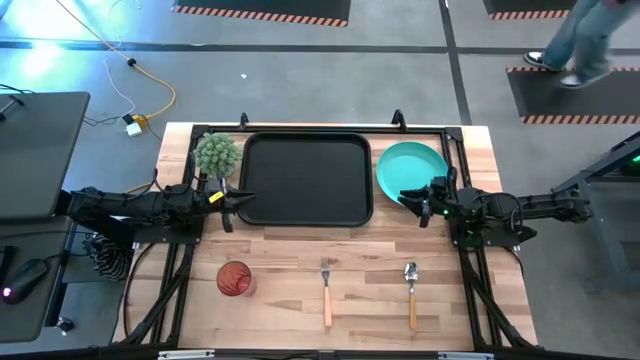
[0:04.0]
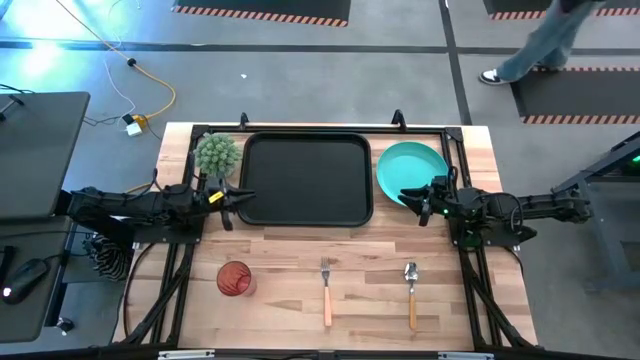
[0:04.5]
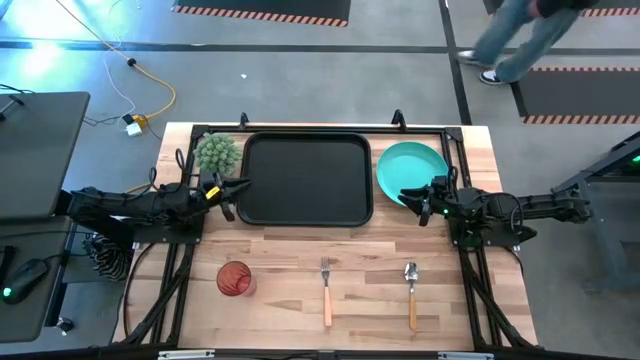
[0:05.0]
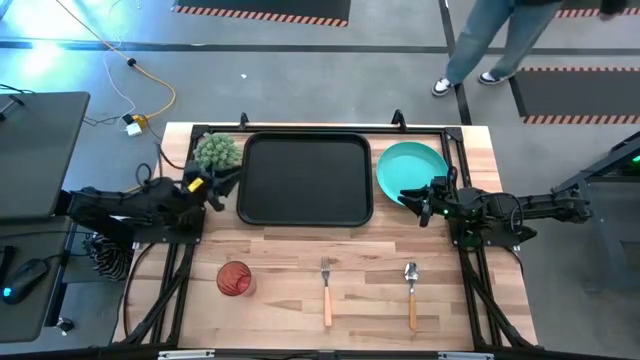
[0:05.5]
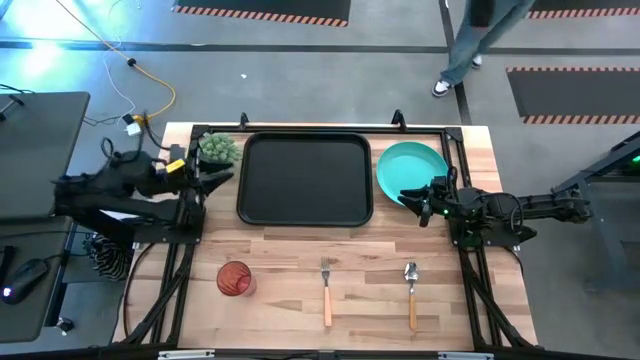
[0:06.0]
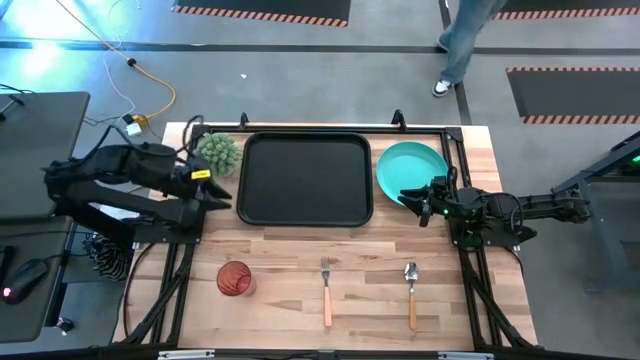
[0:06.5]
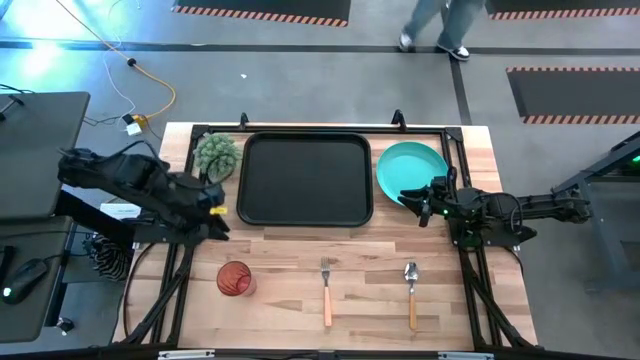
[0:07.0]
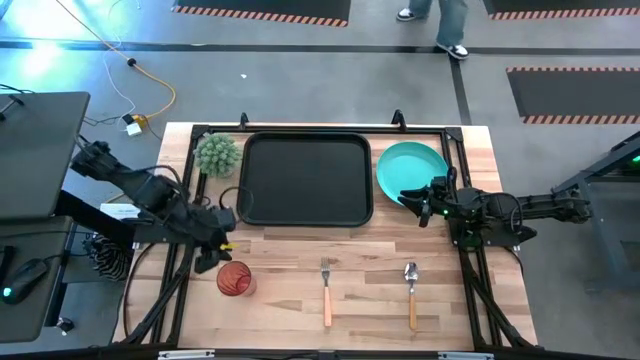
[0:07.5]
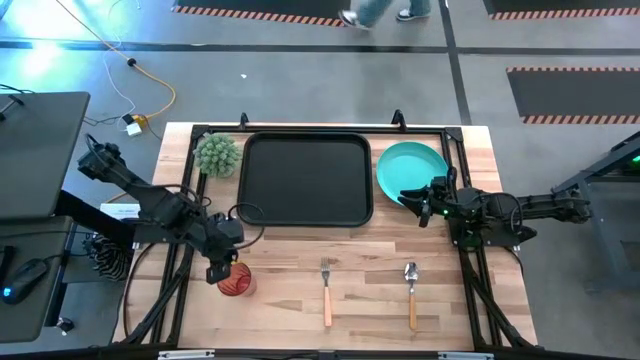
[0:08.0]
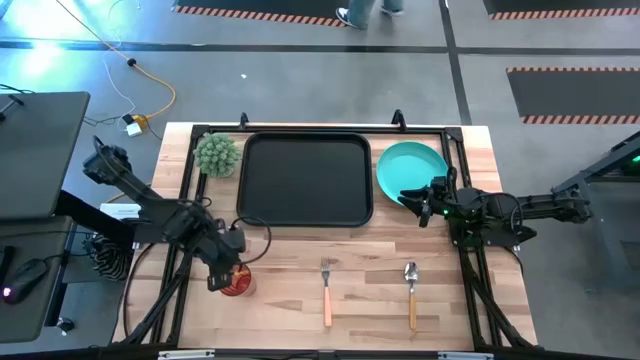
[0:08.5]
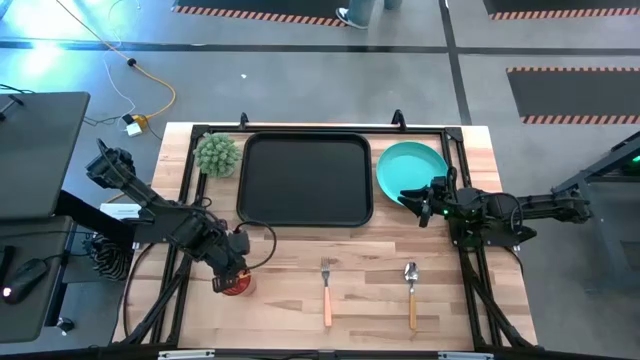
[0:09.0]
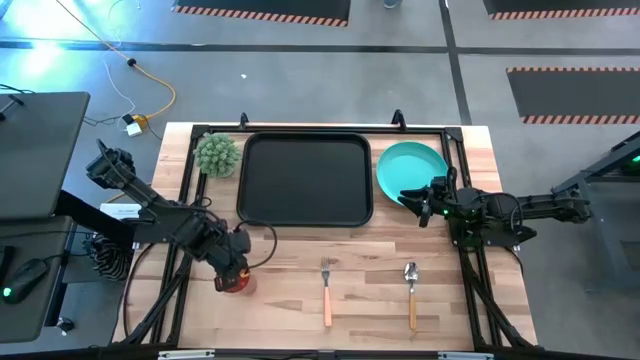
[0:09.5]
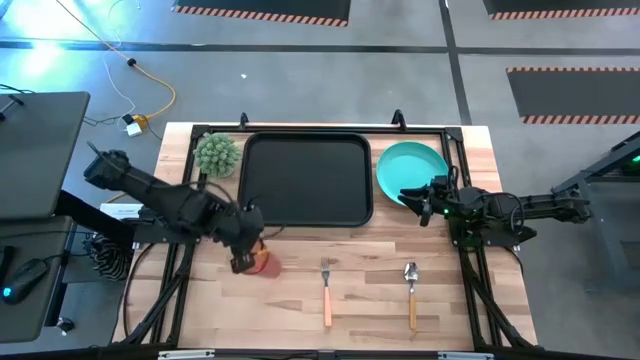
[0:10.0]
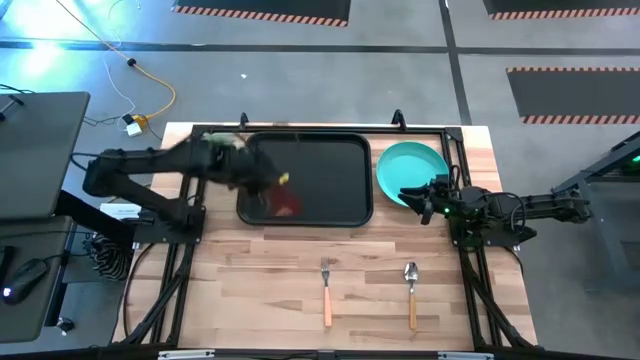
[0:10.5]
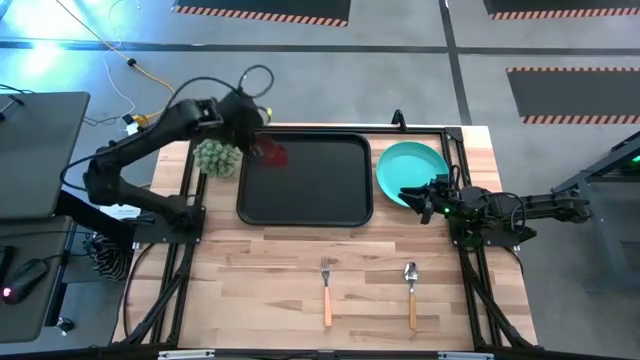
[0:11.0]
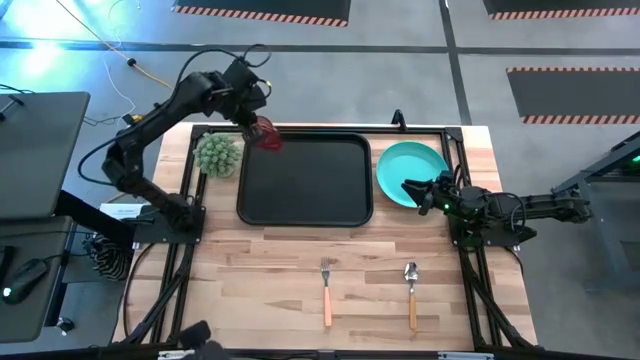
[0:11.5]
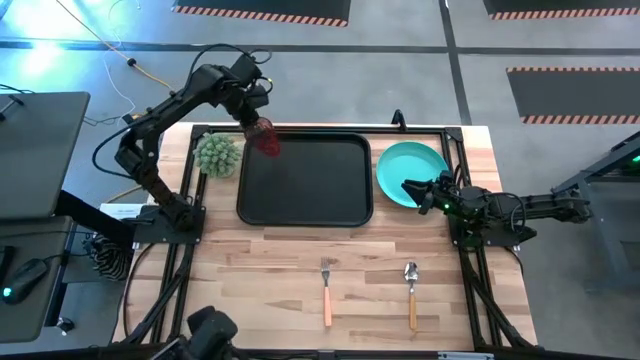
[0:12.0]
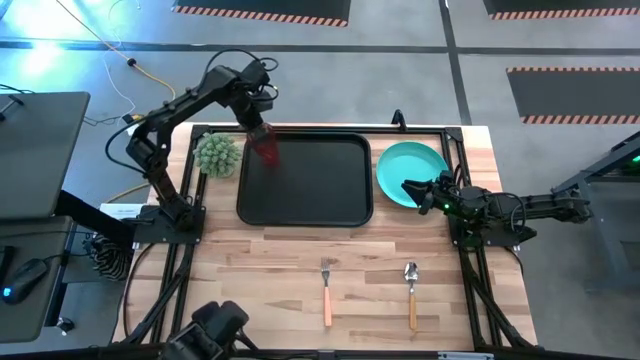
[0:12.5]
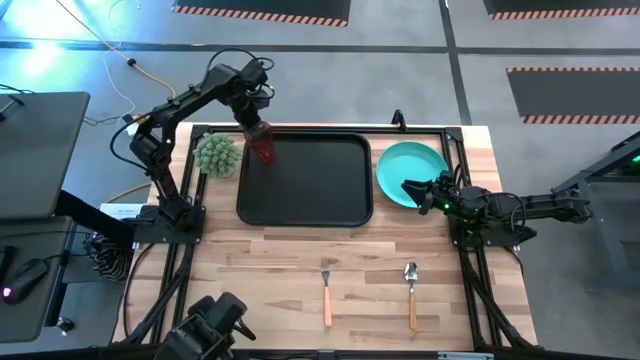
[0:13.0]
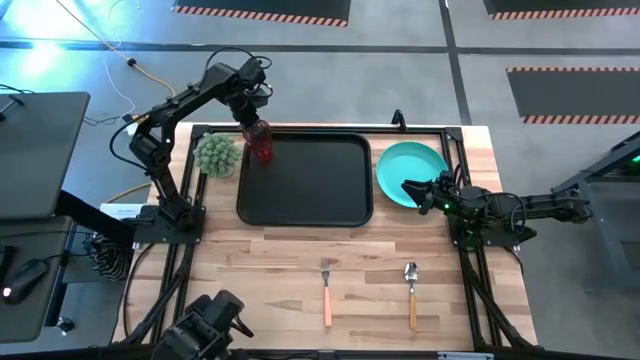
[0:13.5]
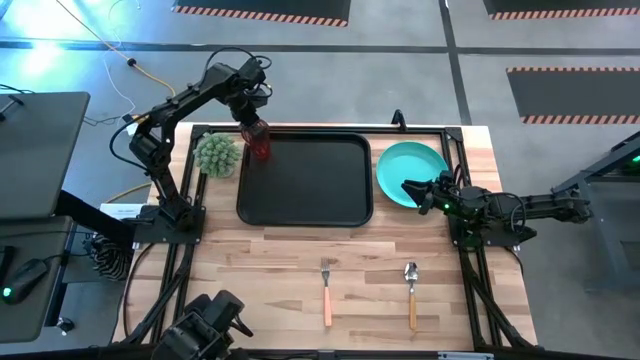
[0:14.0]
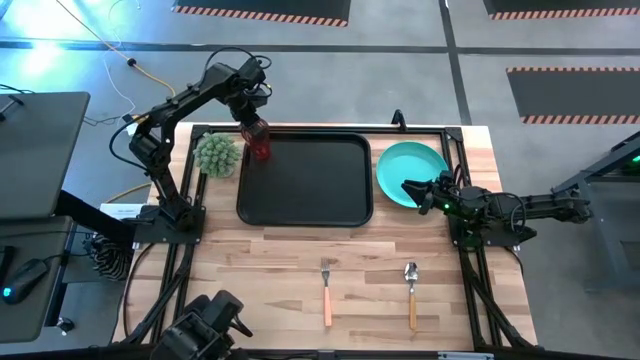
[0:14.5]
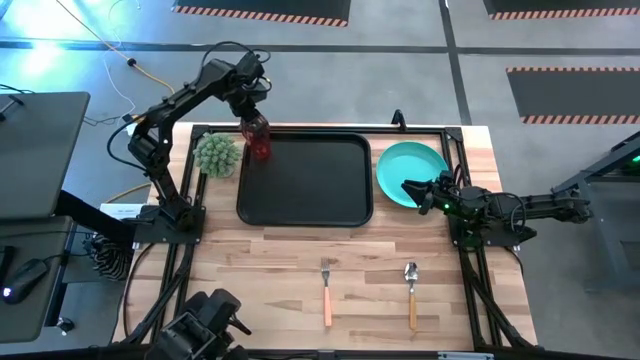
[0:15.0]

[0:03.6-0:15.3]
Task: Pick and place plate/cup/fork/spoon on tray
Put the red cup on the black tray

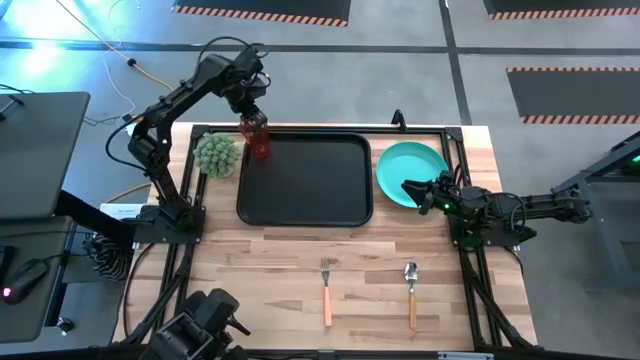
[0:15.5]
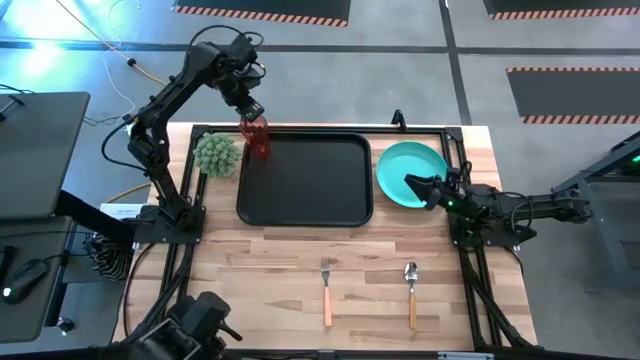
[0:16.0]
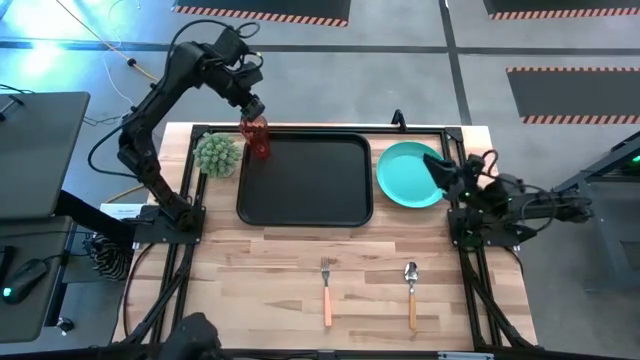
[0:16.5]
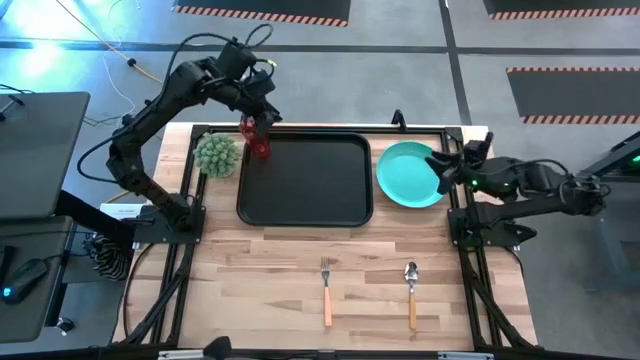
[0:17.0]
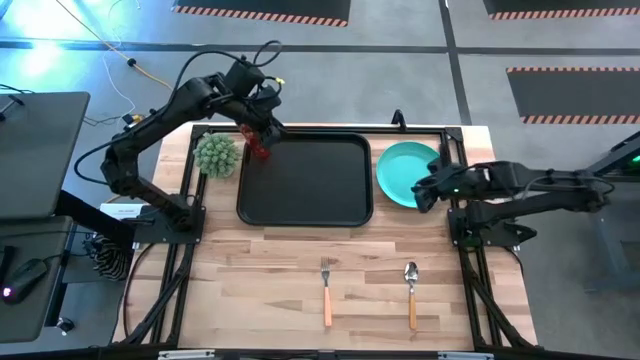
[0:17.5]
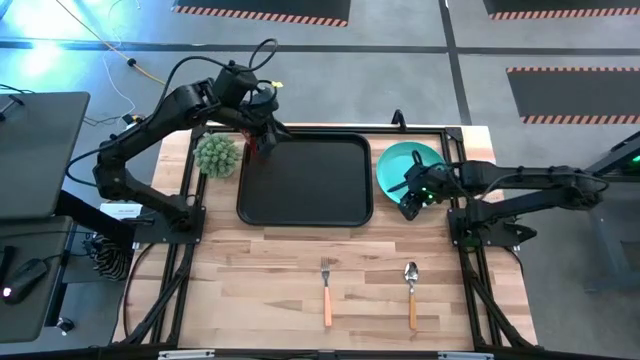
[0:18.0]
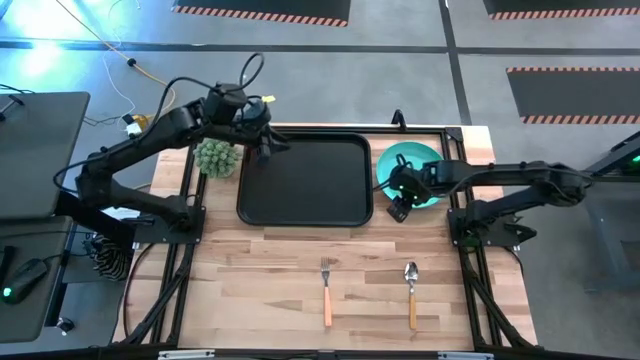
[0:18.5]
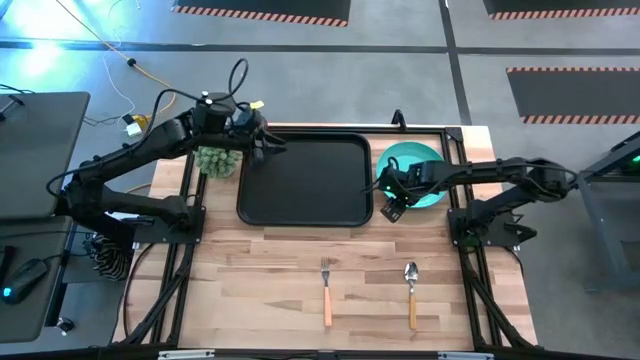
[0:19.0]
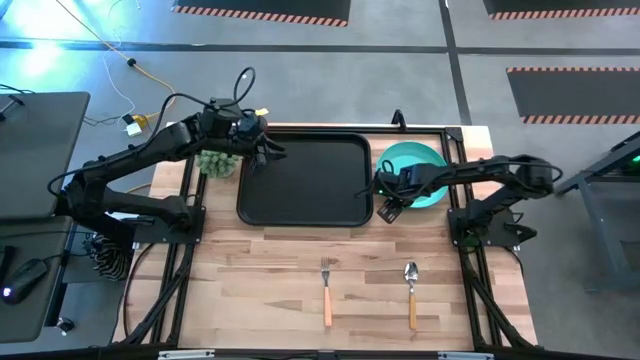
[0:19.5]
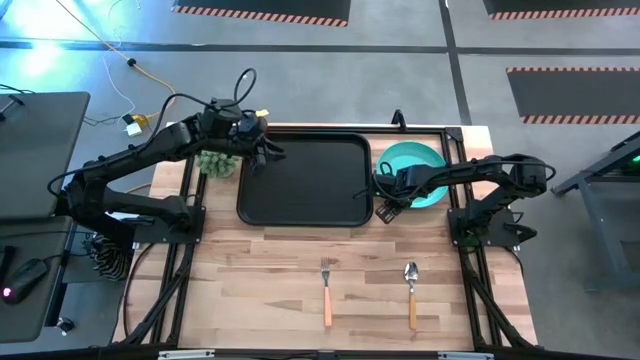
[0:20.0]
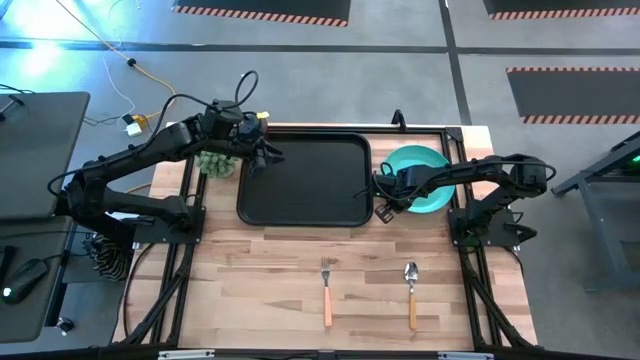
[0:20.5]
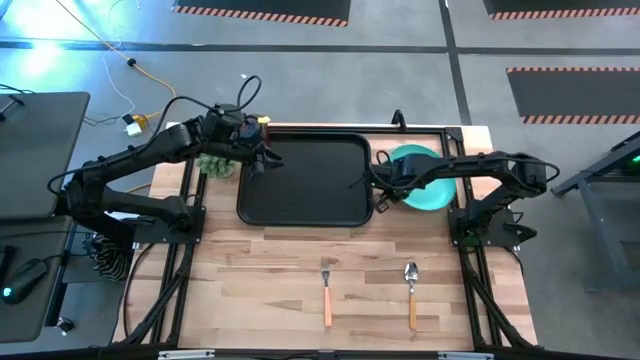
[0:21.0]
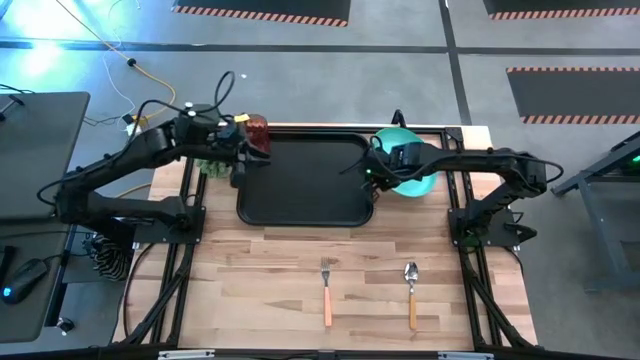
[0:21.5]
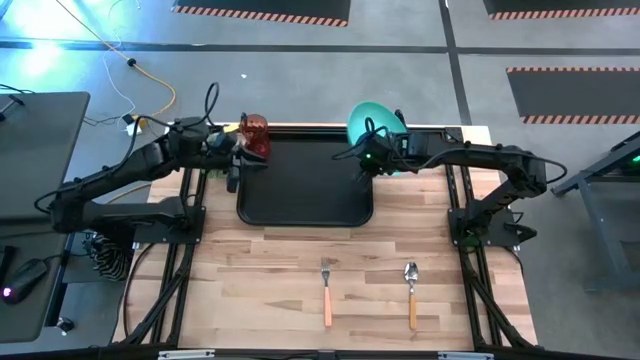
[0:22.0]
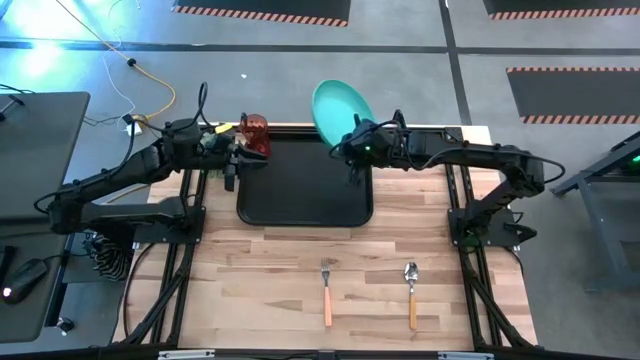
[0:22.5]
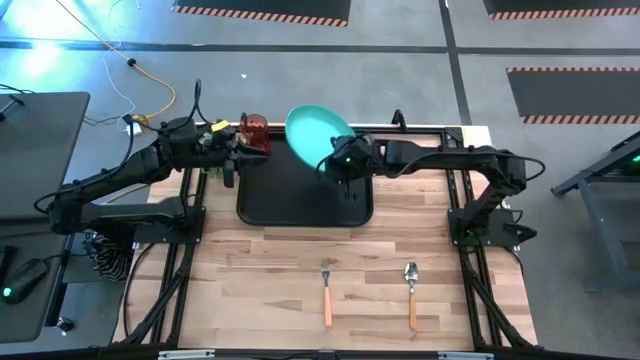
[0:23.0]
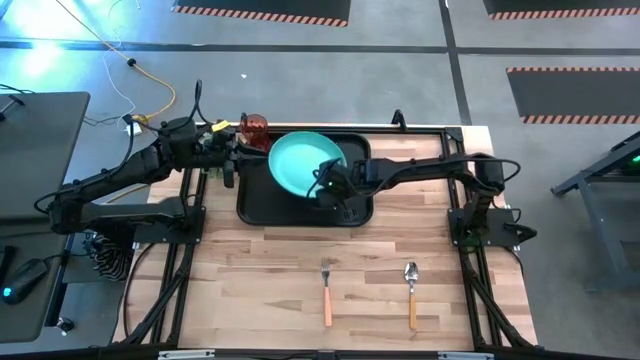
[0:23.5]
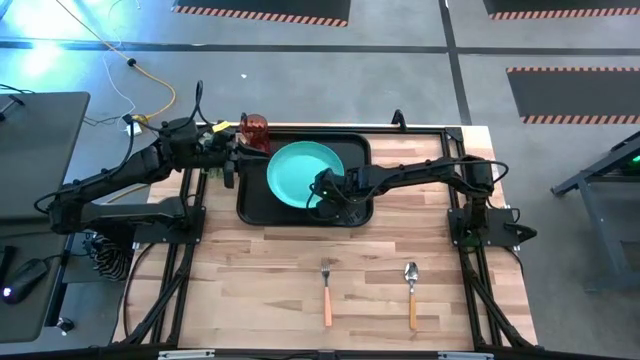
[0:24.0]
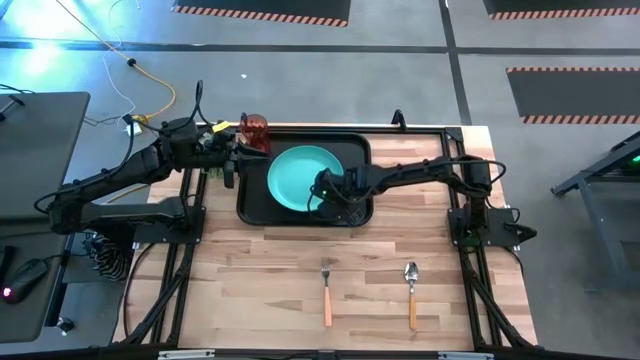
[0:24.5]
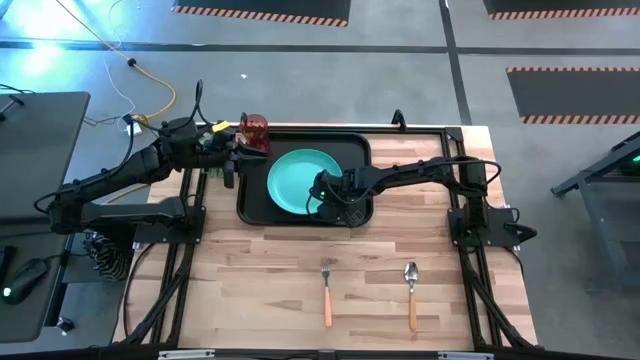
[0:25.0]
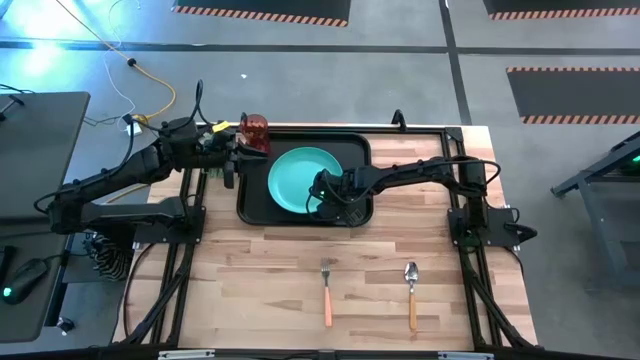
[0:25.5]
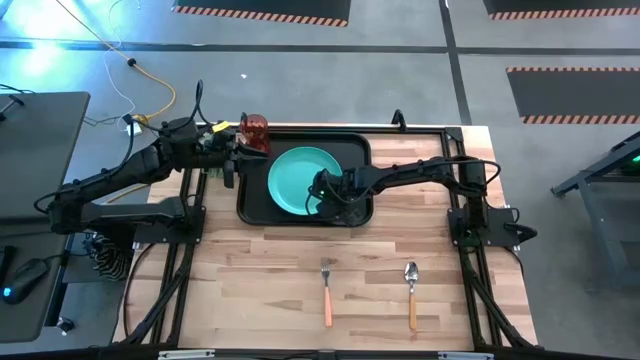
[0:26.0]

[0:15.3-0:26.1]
Put the green plate on the black tray
